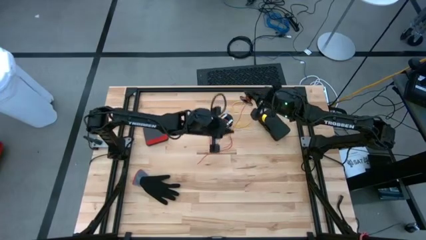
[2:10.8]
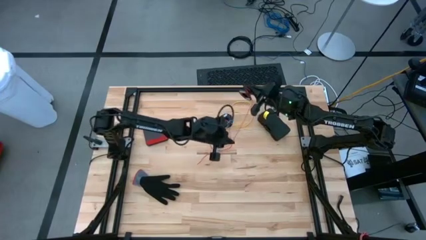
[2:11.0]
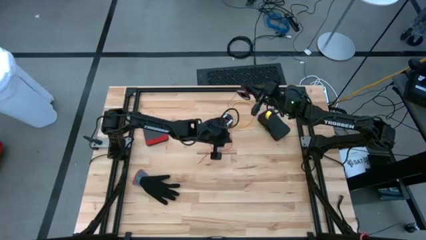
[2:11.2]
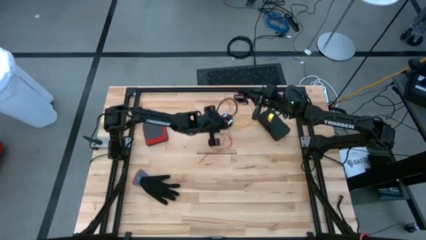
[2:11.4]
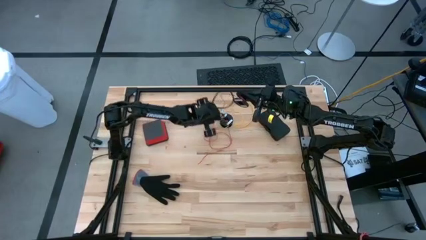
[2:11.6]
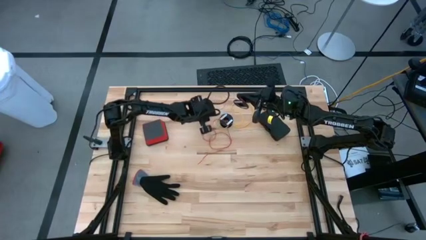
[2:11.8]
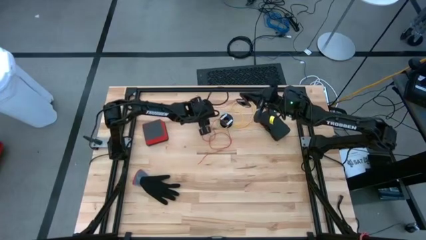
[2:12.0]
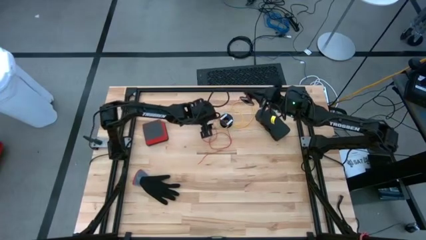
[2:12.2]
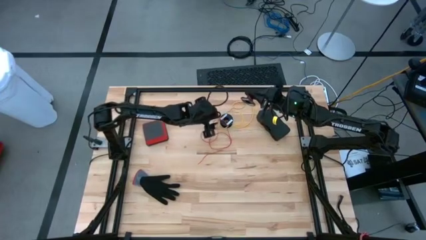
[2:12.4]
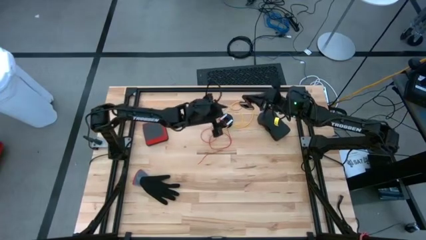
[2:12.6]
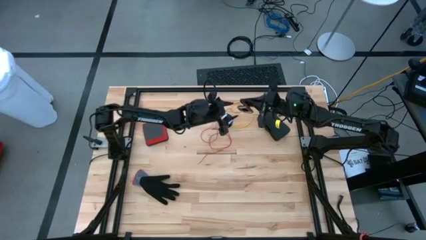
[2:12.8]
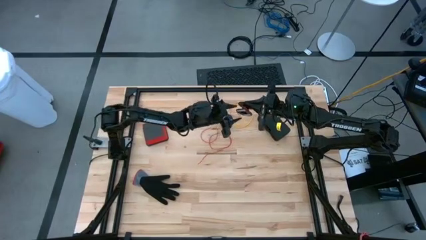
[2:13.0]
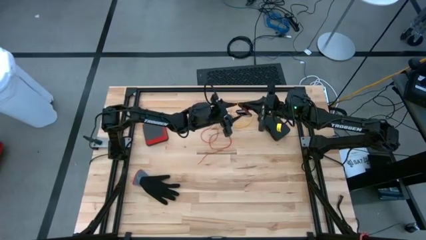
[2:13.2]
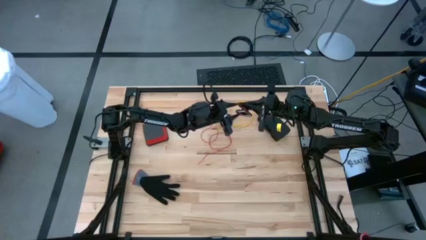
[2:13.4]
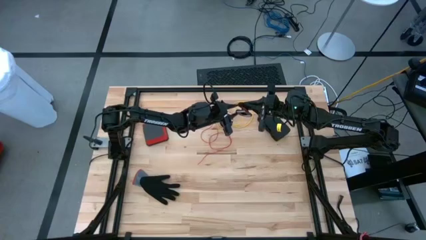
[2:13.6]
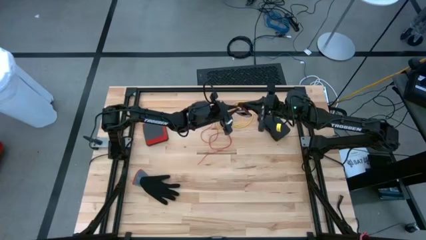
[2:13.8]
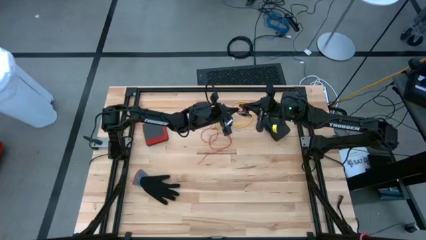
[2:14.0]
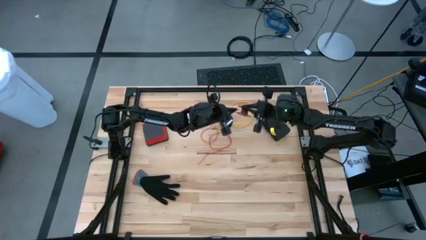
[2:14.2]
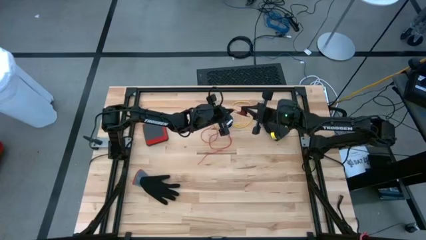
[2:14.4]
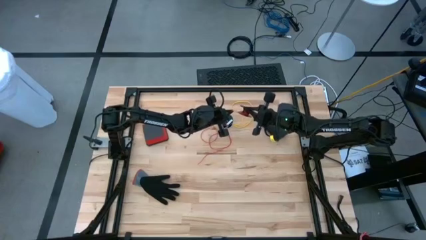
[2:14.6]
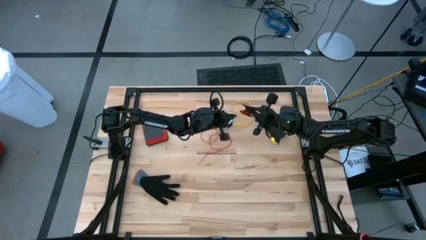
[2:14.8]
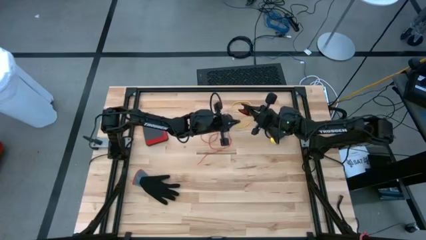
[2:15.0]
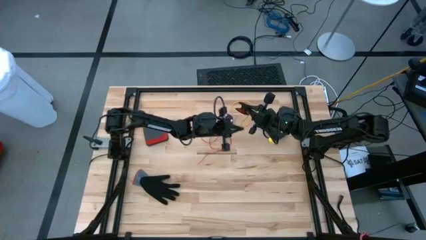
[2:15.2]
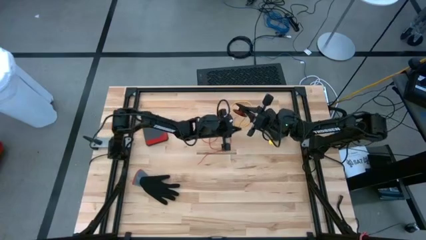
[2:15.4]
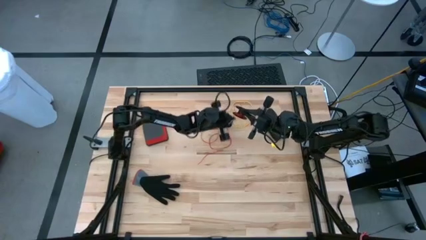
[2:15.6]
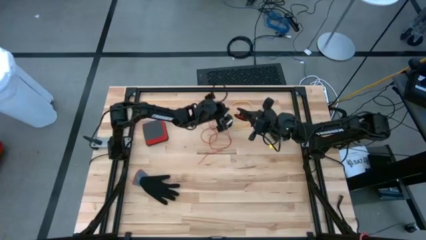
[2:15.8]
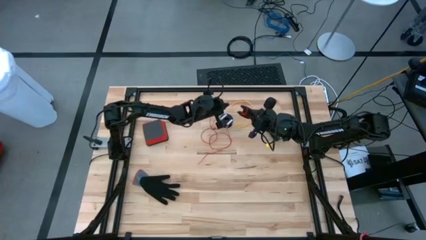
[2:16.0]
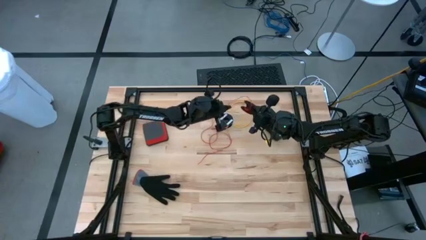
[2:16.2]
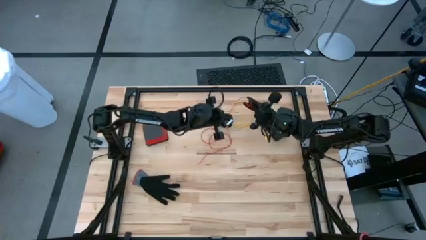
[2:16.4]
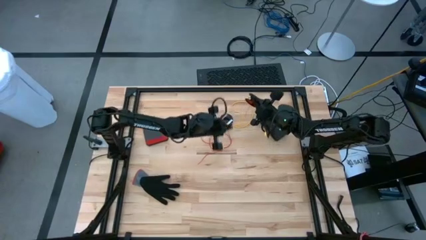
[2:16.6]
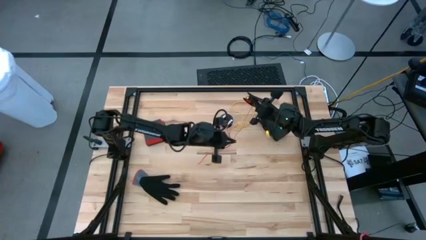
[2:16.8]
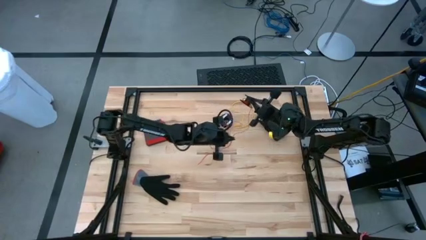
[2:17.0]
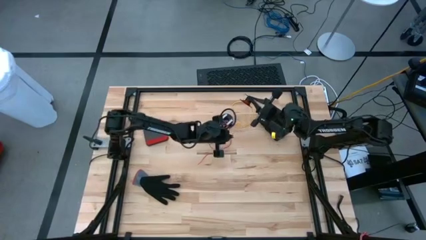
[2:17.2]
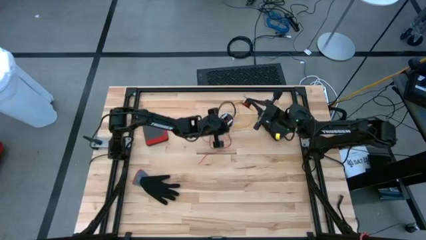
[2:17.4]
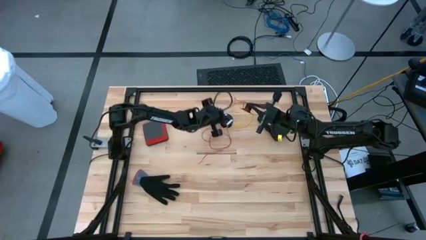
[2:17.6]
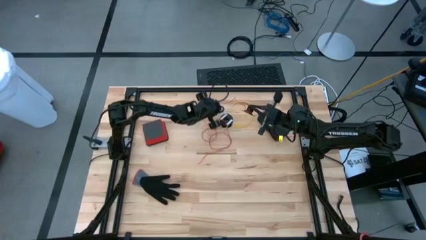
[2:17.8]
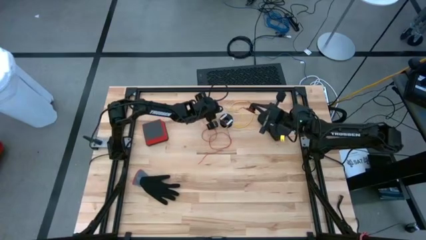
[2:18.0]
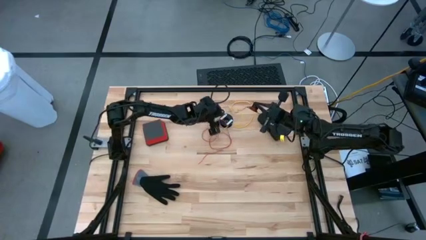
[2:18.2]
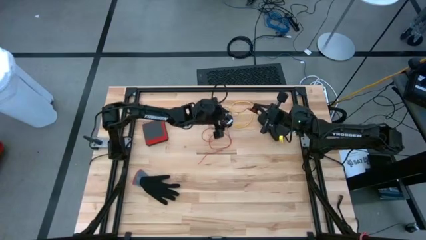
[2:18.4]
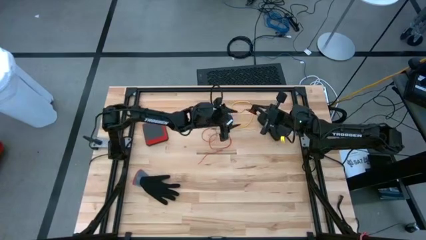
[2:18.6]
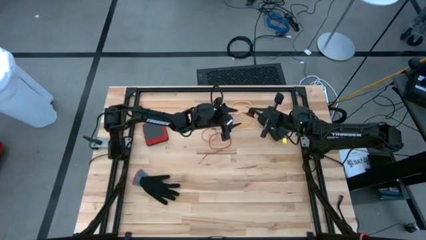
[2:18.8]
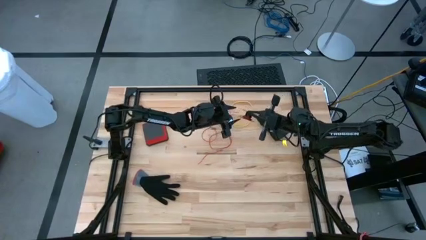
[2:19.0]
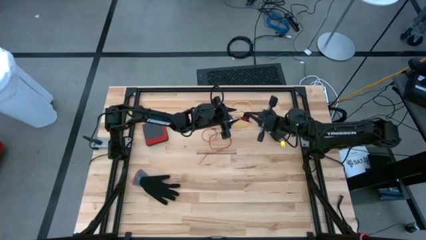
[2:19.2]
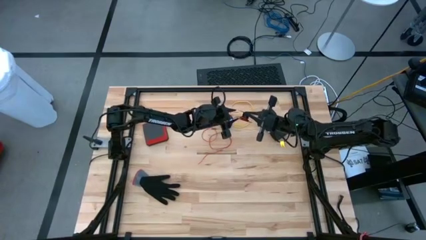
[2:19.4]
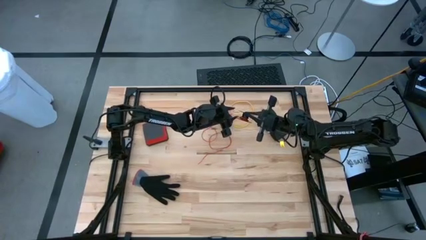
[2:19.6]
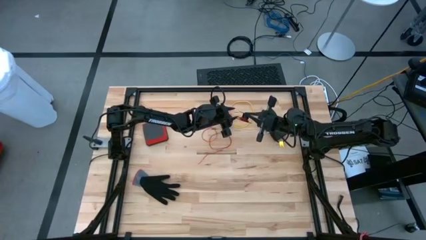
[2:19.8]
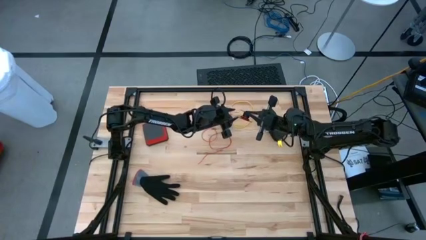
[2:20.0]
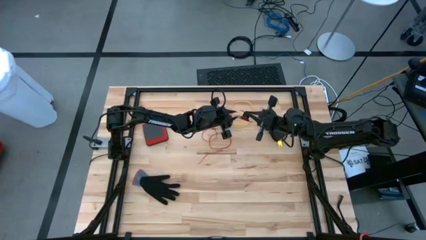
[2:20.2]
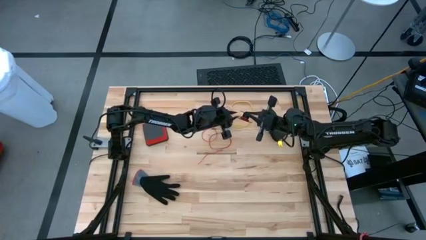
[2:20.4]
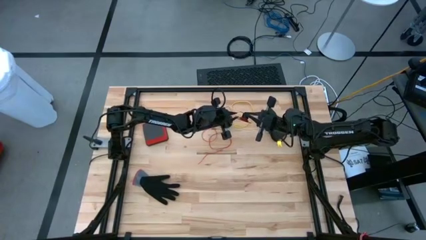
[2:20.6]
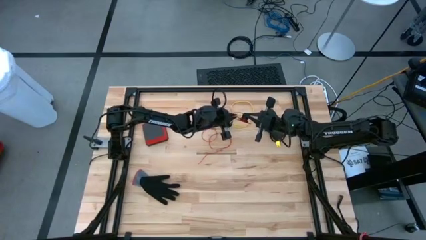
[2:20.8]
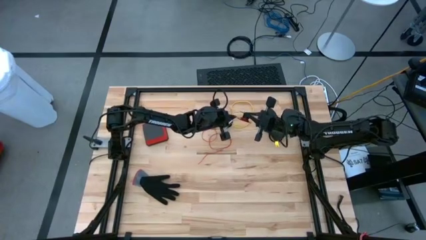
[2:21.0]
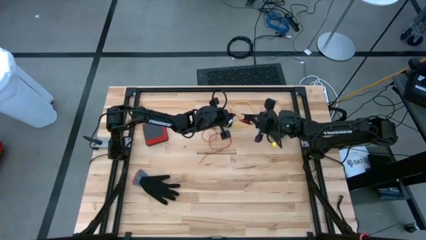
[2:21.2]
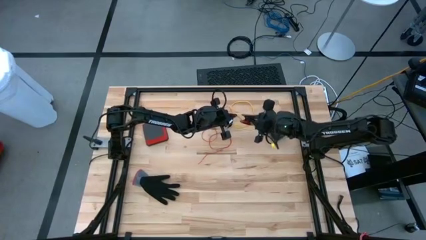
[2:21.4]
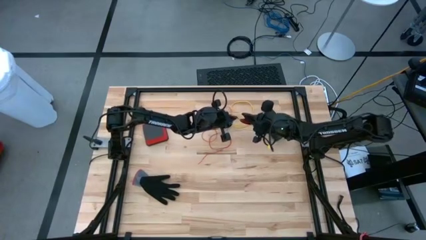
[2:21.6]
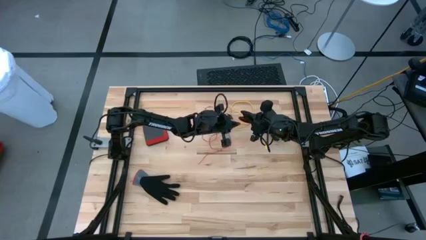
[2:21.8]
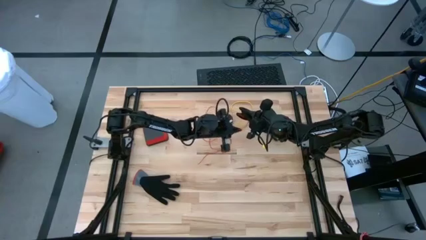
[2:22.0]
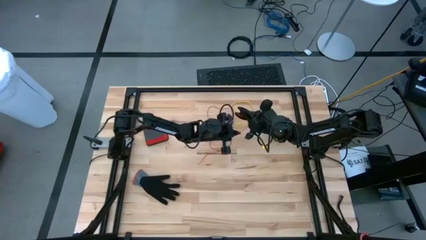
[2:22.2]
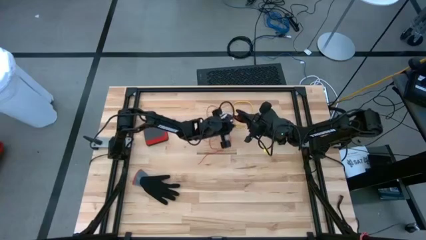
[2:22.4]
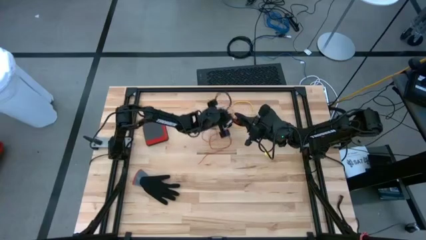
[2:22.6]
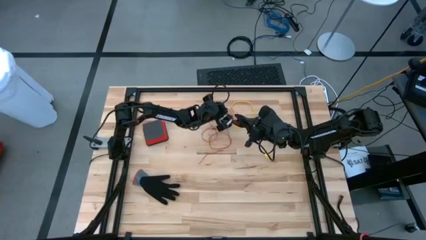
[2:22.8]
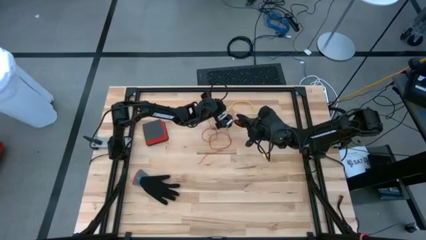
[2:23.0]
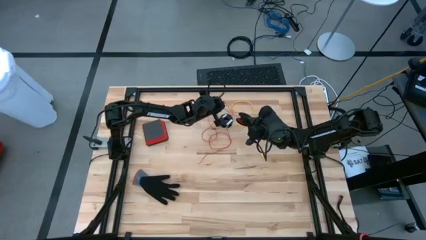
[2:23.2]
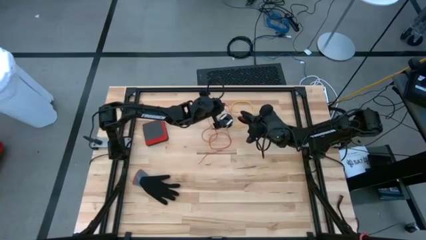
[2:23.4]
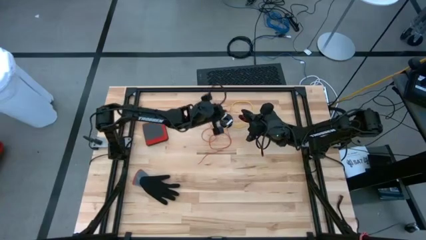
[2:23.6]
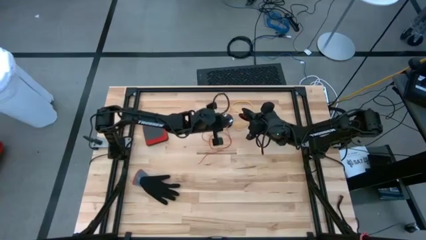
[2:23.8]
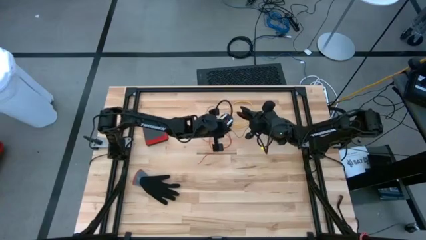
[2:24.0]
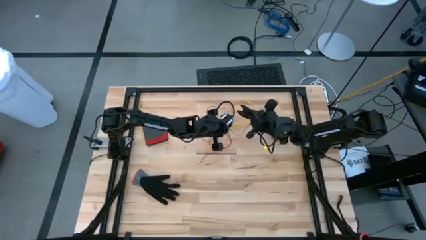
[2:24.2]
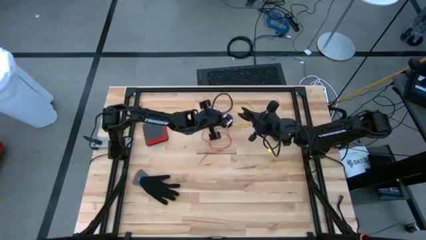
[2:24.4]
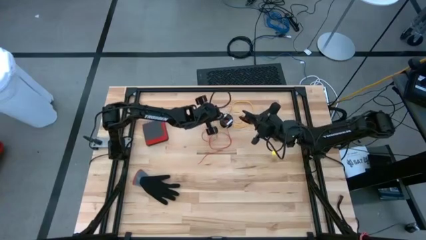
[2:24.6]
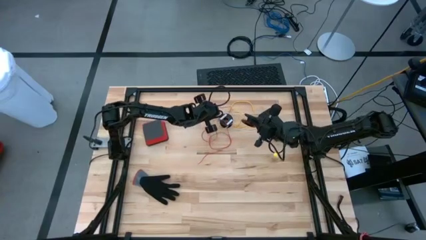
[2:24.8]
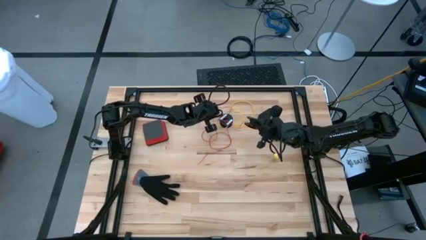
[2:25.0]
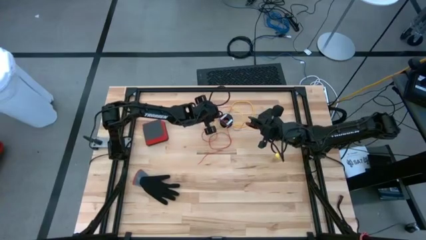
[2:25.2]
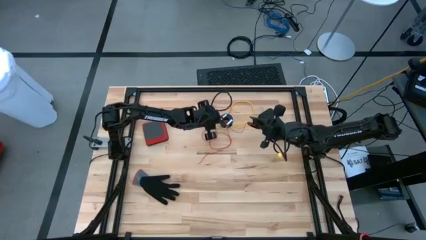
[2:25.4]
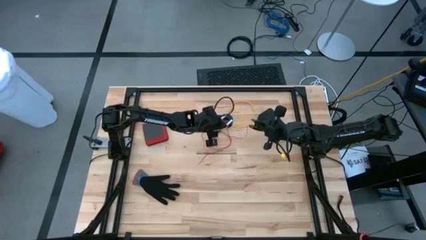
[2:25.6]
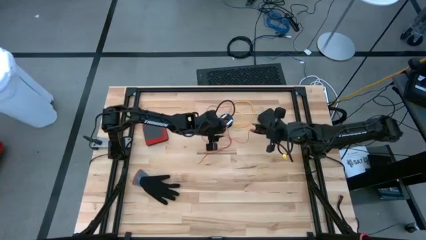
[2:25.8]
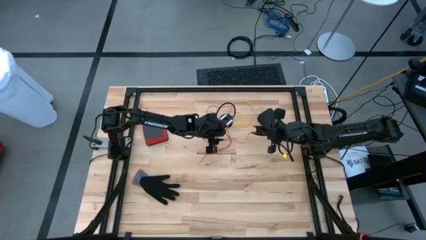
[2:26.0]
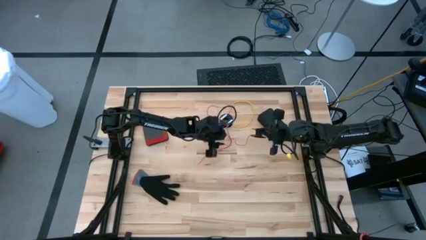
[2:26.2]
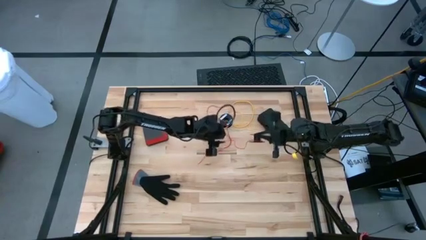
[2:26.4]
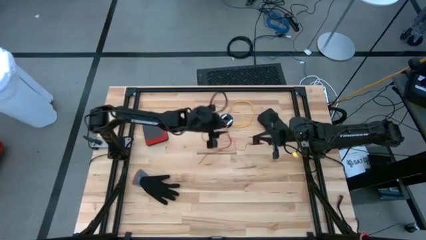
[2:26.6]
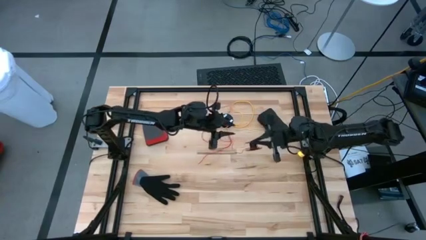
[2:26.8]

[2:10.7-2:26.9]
Task: Coil cords
Uncoil the red wire from the spool
